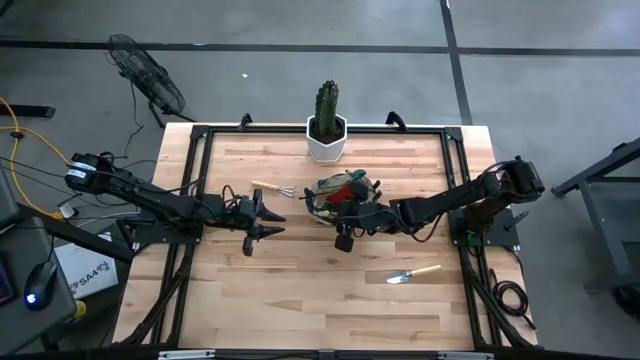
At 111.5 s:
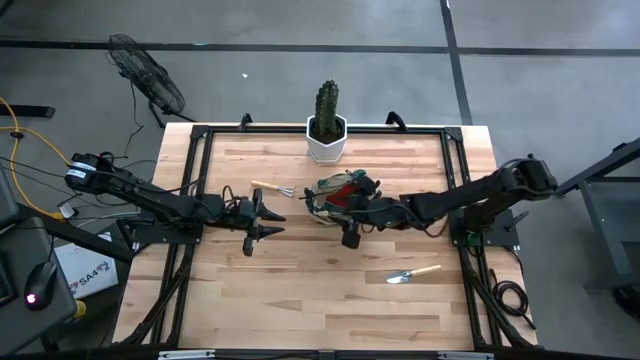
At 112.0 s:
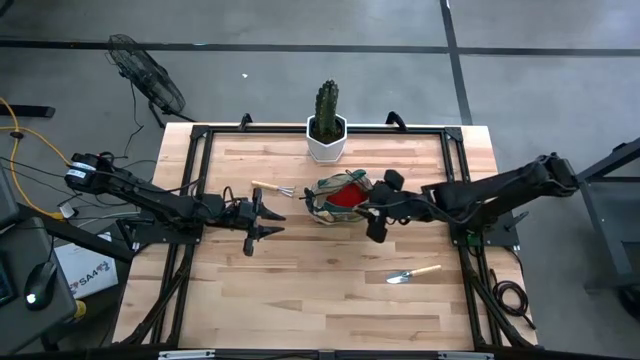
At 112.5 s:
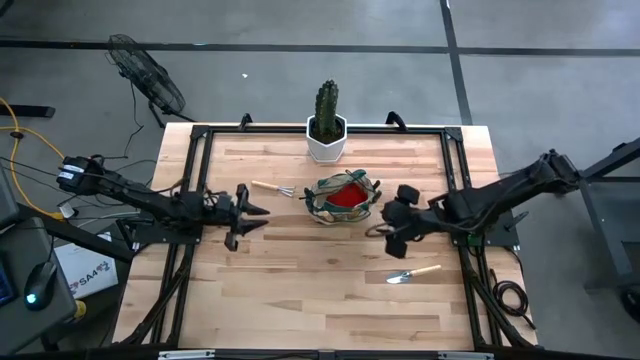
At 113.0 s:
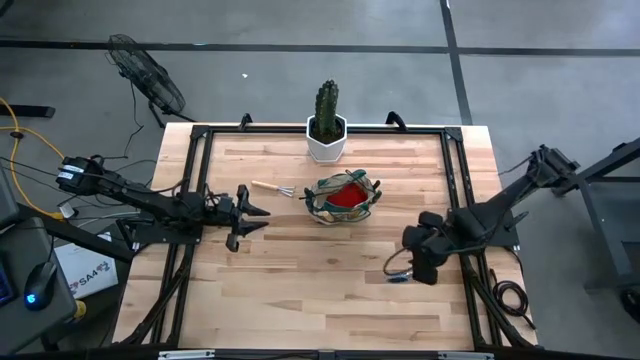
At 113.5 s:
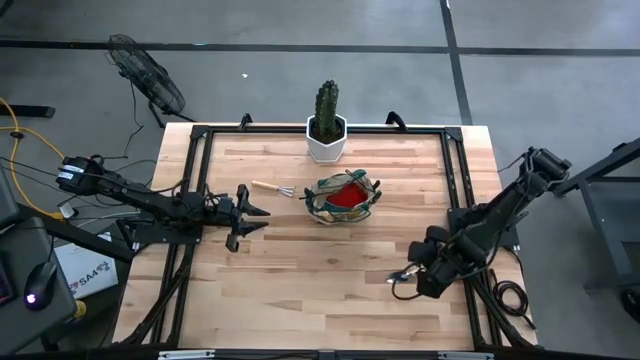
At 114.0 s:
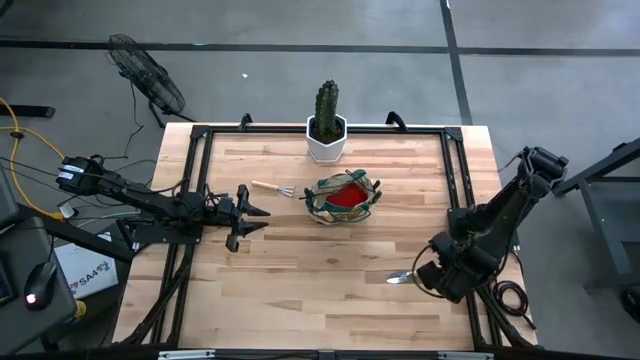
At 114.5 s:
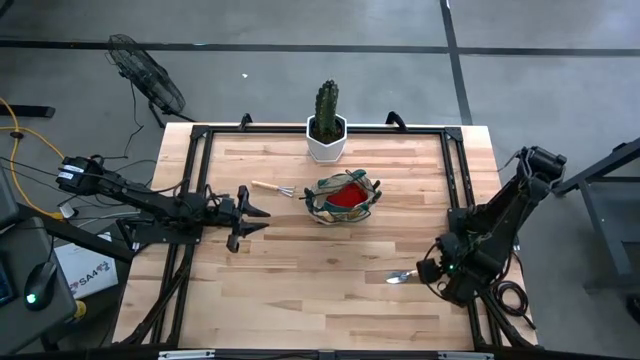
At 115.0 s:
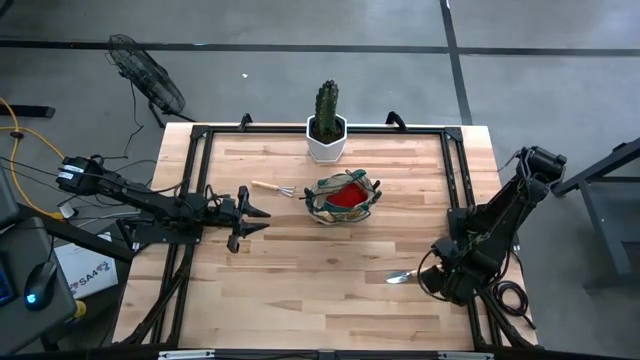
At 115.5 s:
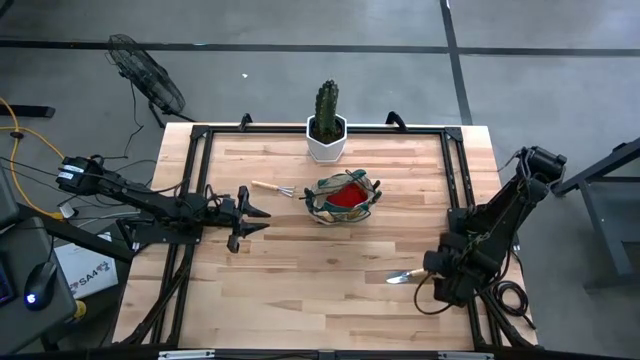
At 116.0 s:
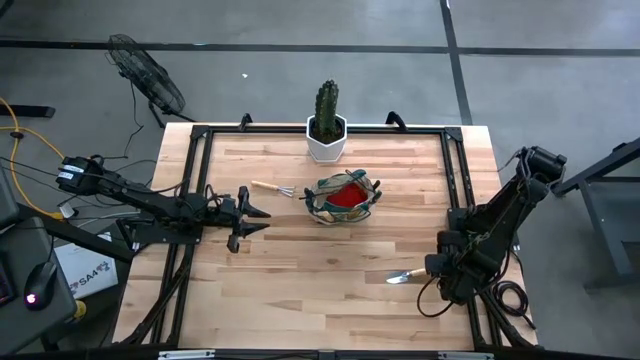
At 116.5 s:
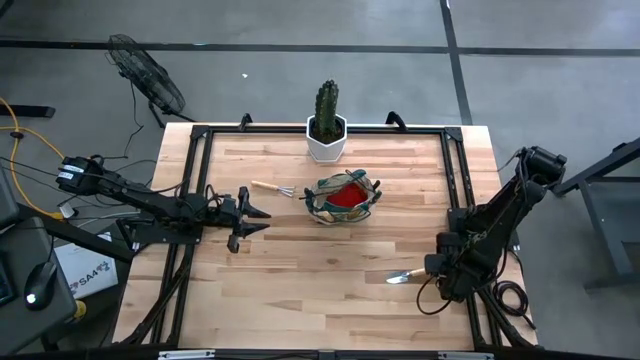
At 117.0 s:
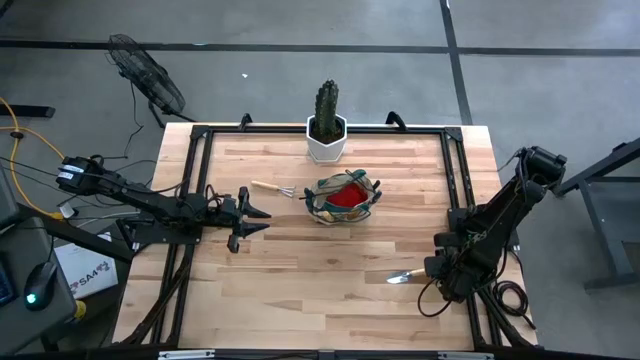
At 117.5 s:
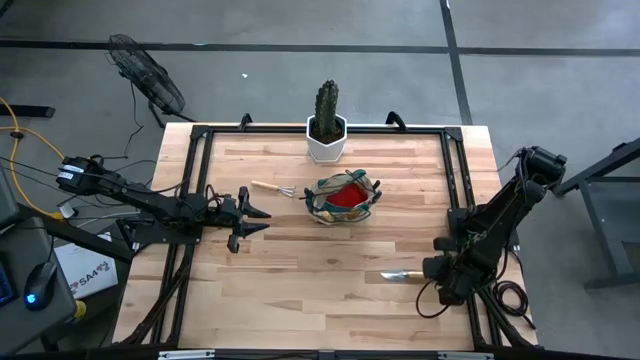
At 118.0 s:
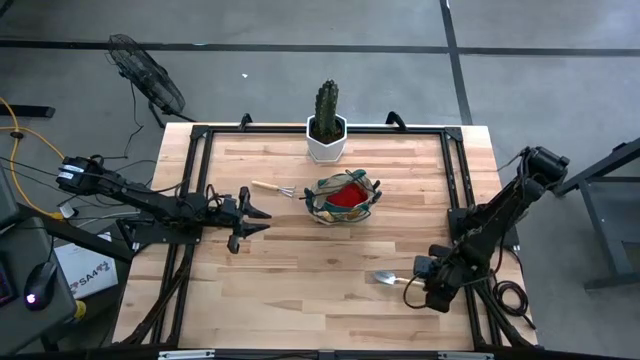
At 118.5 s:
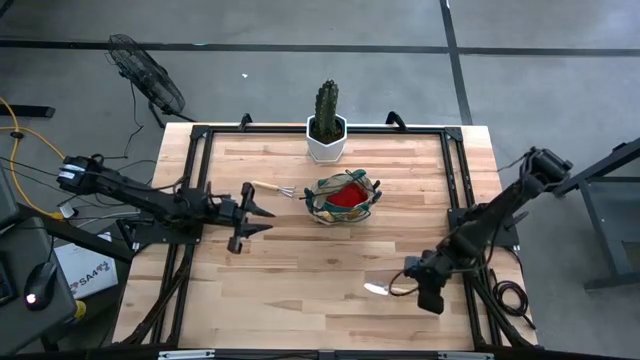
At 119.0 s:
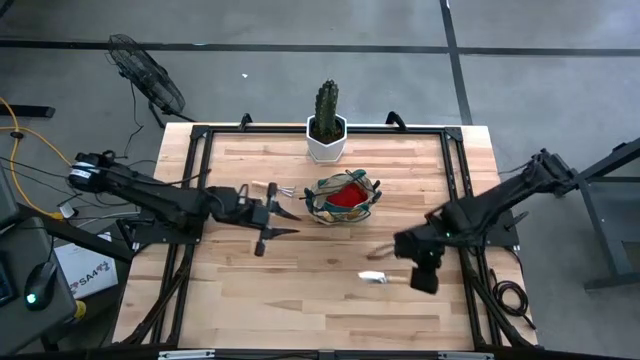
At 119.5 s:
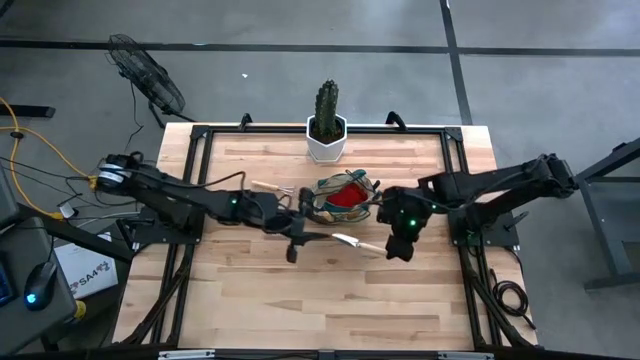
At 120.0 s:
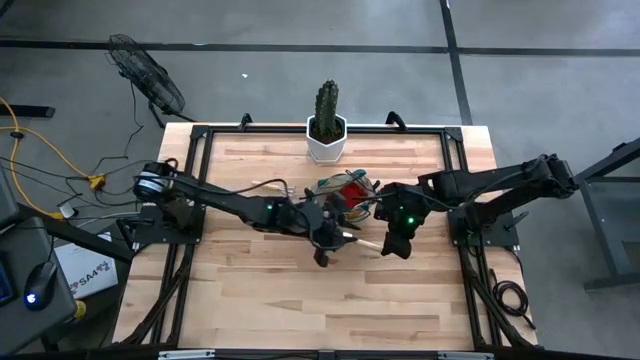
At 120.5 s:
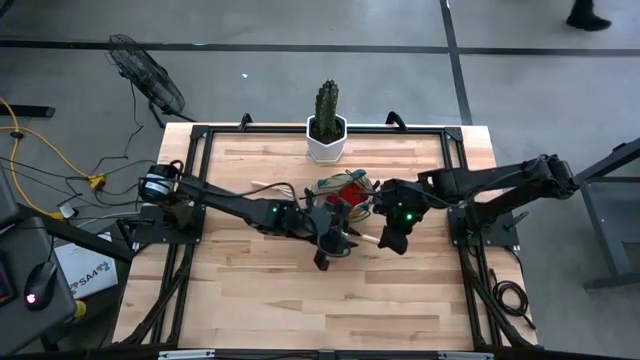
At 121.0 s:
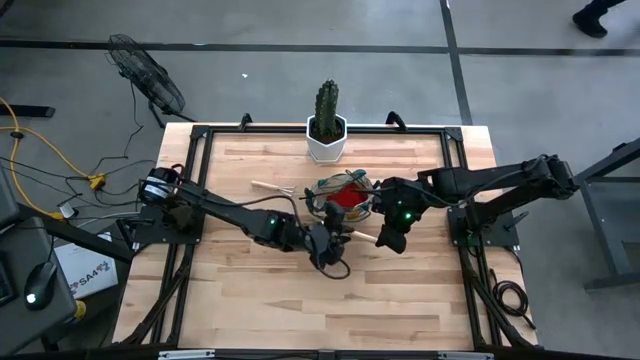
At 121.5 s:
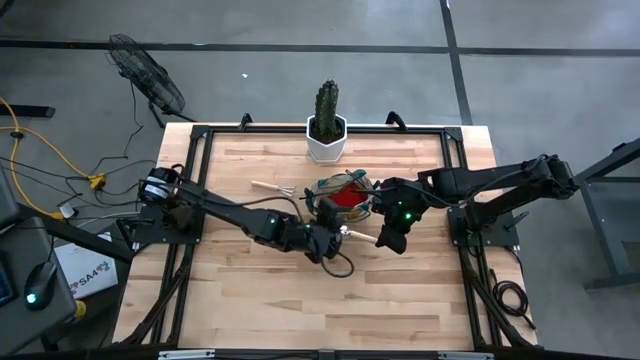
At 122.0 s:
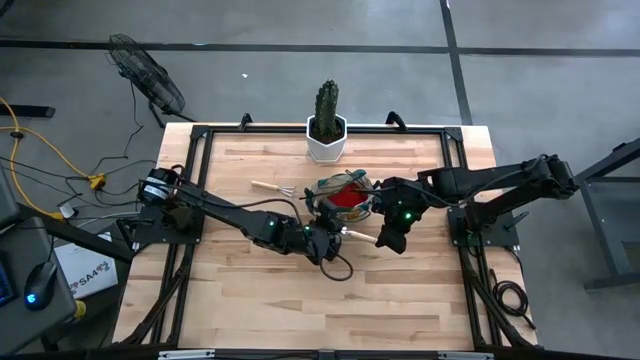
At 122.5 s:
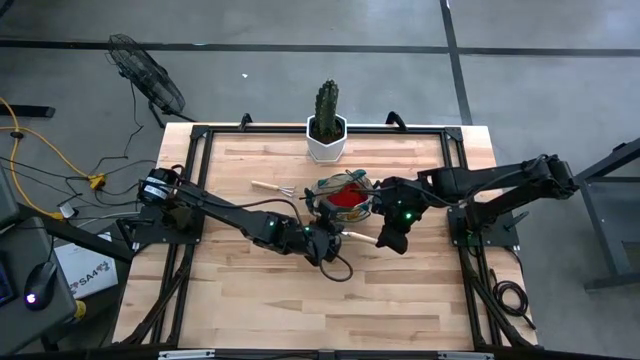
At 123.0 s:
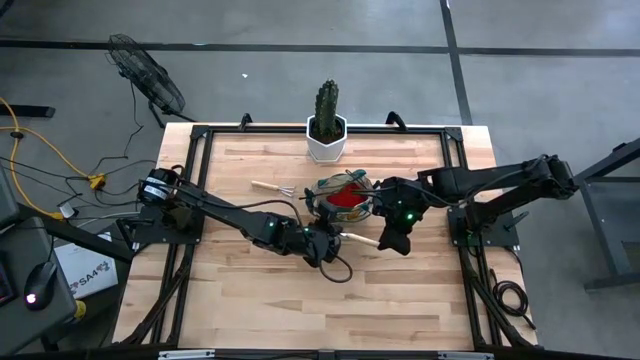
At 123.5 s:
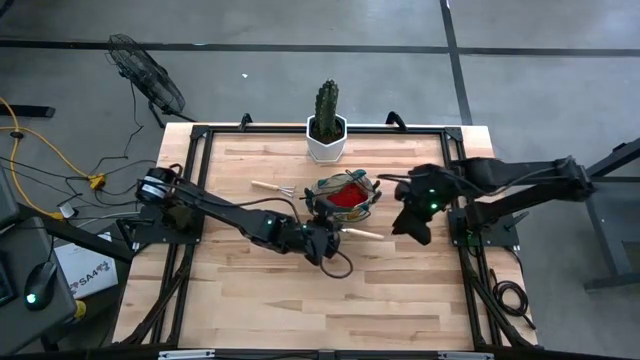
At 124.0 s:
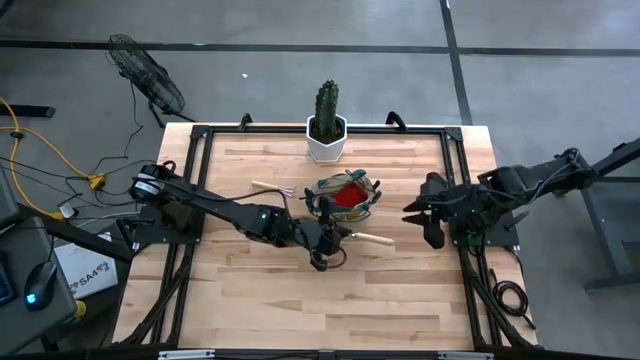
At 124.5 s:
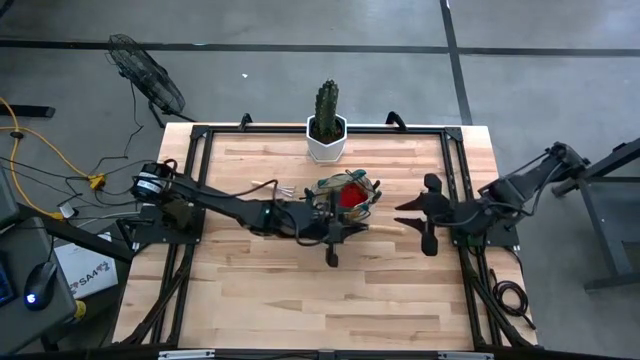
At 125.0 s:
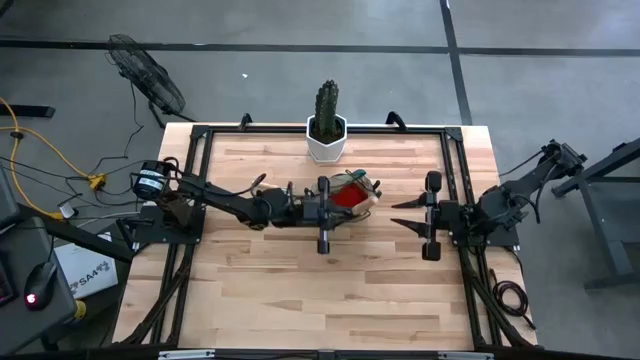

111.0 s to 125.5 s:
Task: Pick & Place Garden tools in Gardening bag
Put the brown trowel into the brown gardening bag

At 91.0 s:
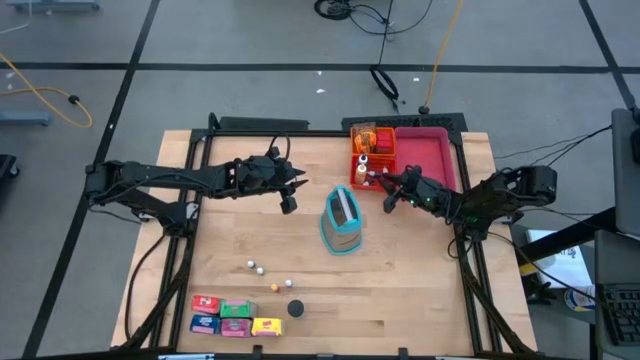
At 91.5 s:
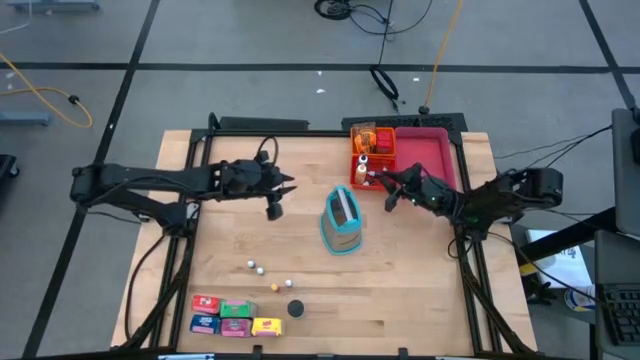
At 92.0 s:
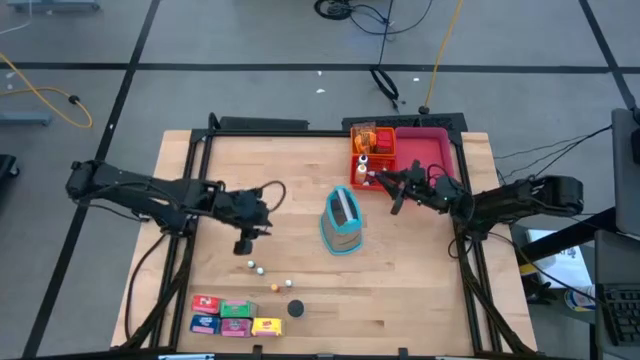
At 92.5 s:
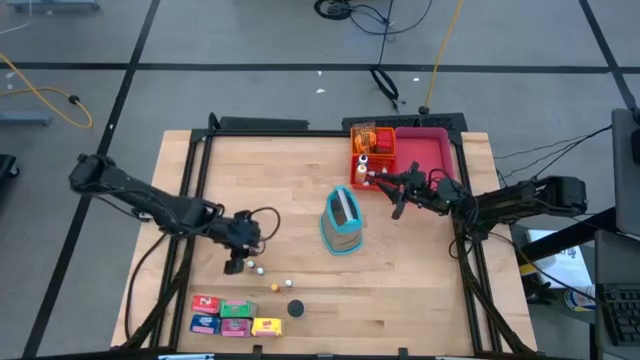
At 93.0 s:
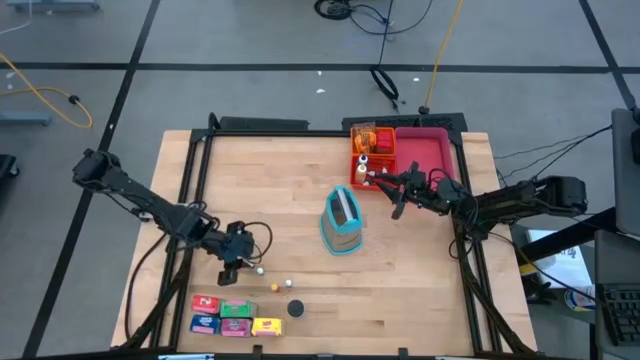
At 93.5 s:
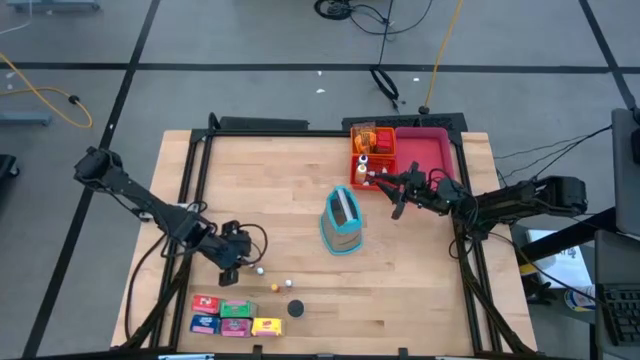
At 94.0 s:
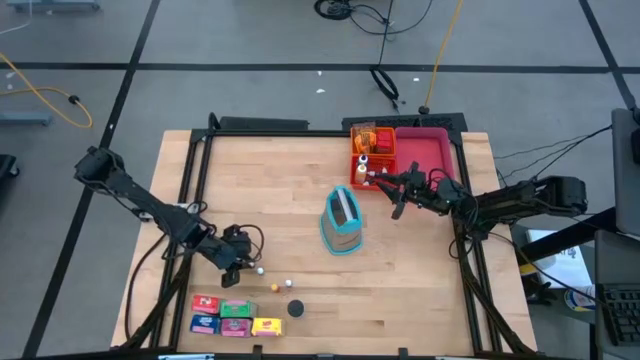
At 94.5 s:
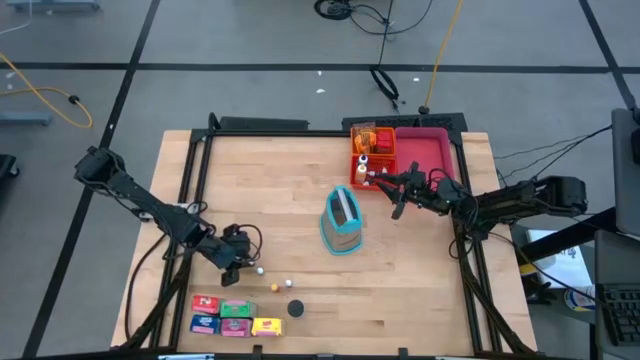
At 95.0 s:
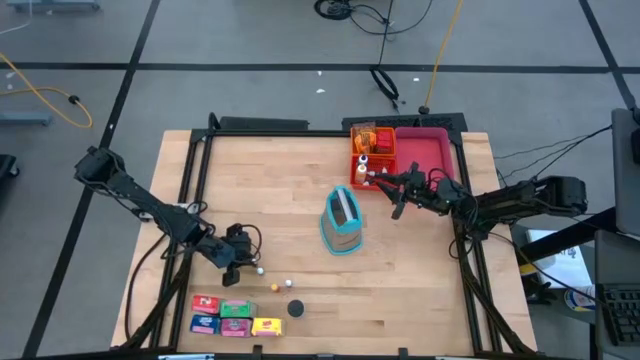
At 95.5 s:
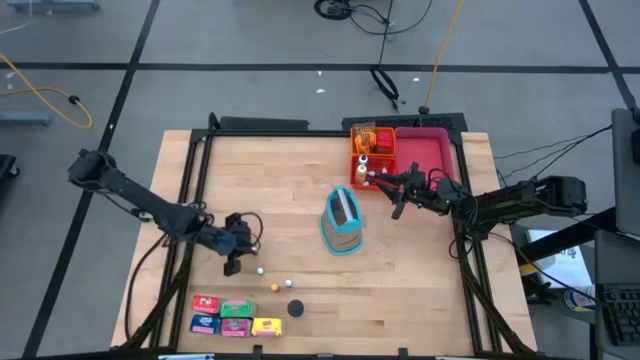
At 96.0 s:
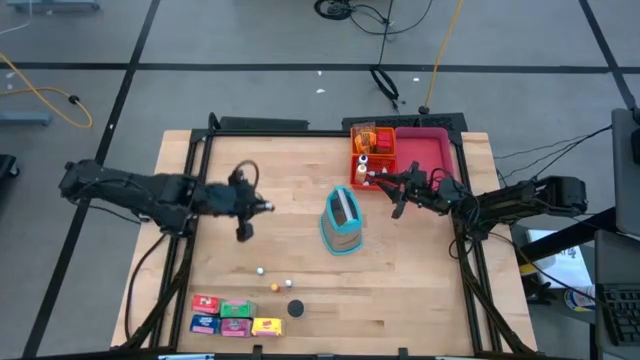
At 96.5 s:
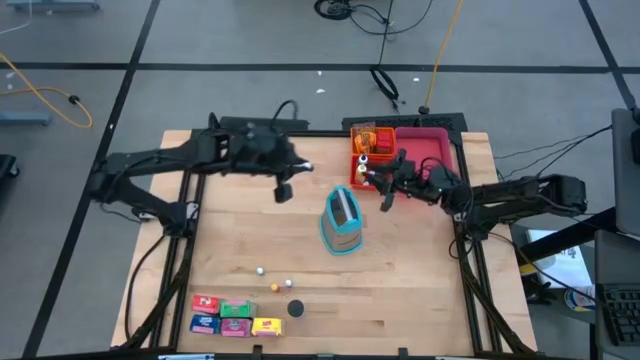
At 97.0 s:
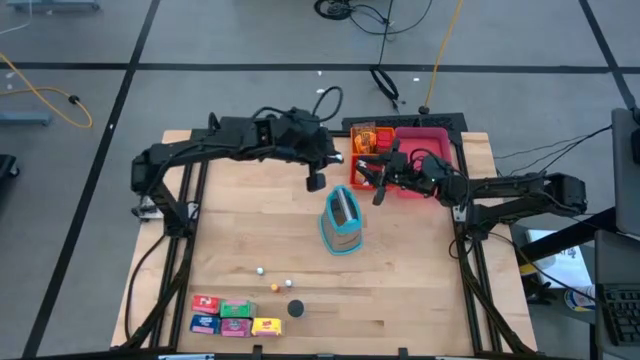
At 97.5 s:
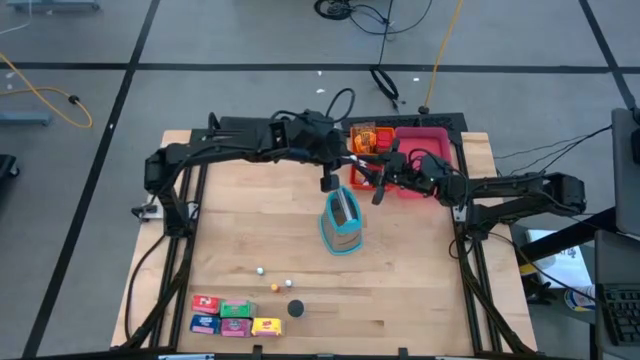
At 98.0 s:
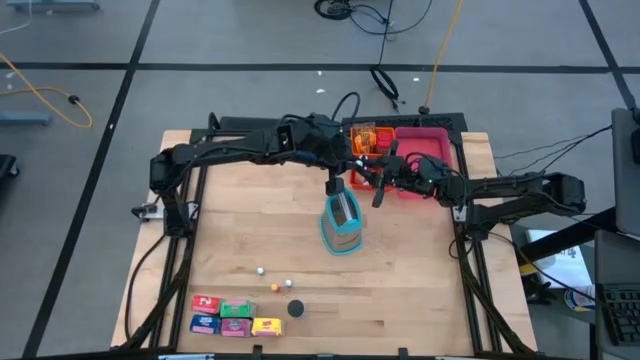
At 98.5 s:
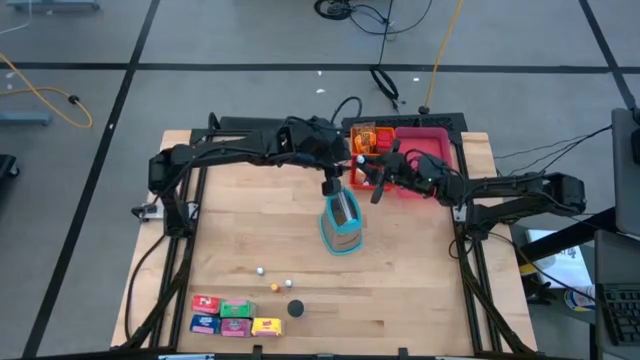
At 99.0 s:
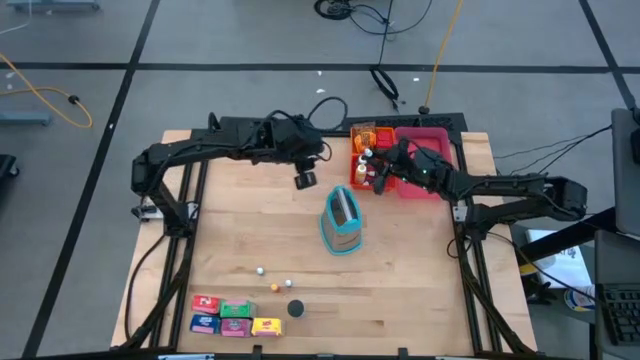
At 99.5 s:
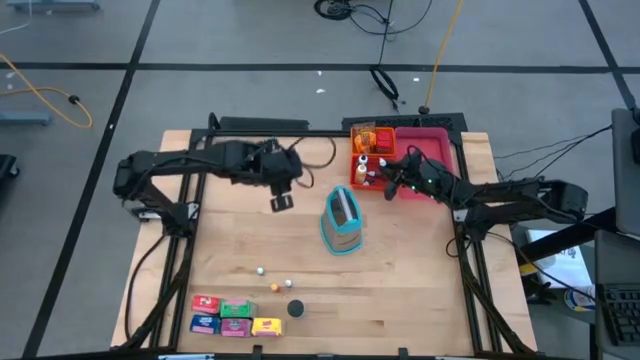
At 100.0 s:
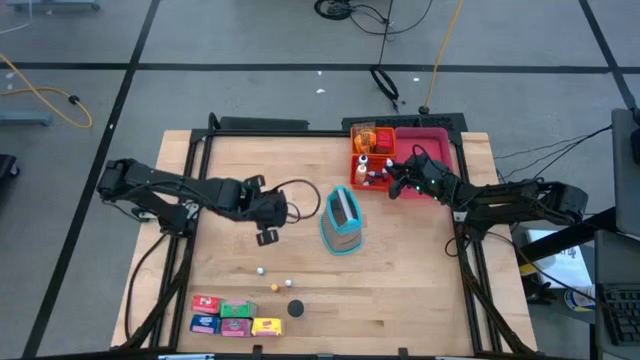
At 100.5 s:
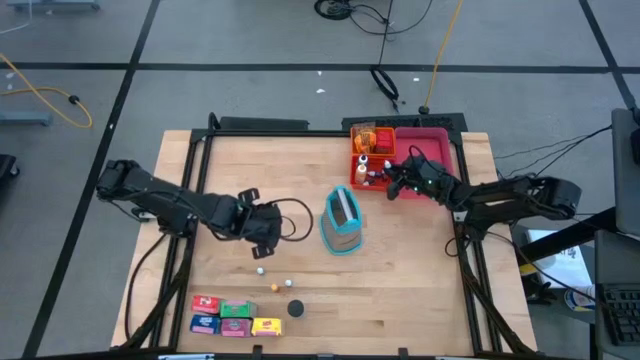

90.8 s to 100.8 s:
Task: Pick & Place Kitchen Items
Put the small brown food coloring bottle into the red bin
